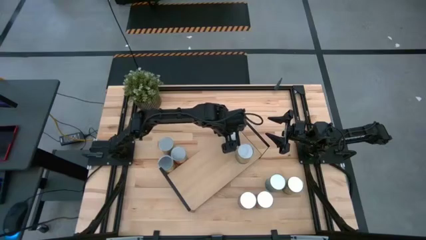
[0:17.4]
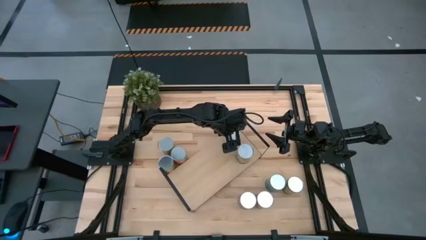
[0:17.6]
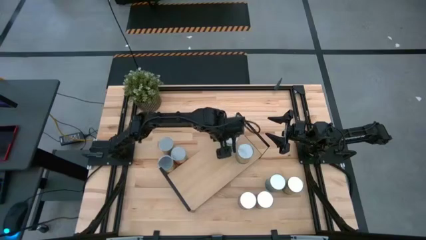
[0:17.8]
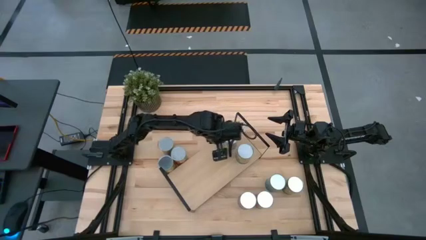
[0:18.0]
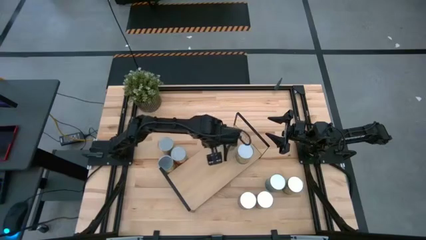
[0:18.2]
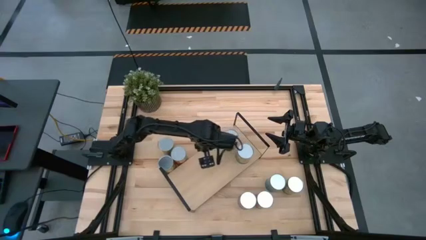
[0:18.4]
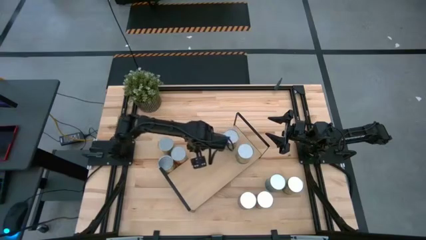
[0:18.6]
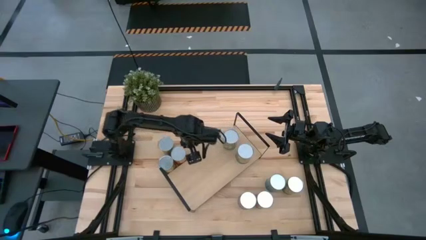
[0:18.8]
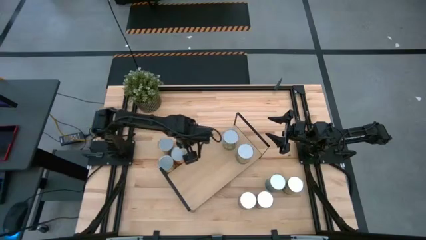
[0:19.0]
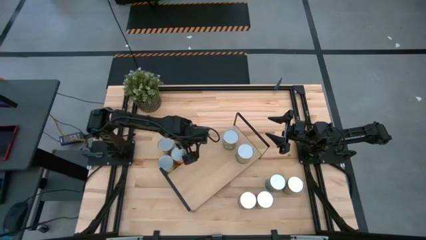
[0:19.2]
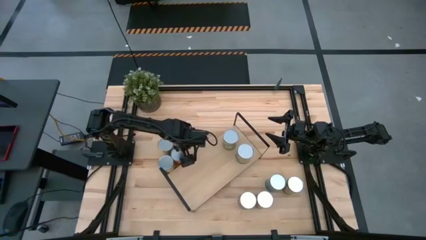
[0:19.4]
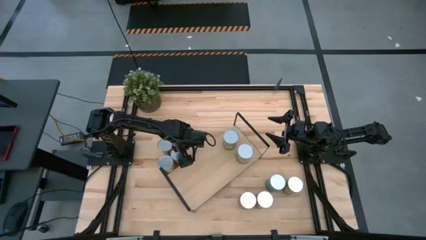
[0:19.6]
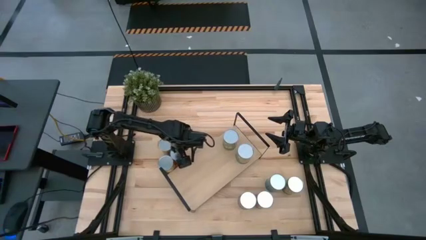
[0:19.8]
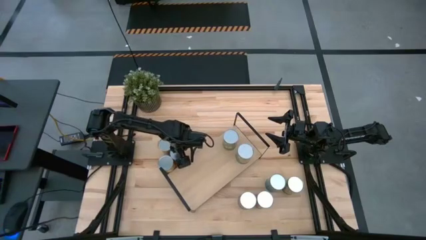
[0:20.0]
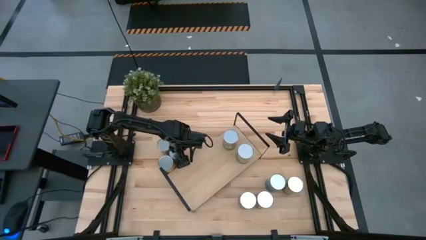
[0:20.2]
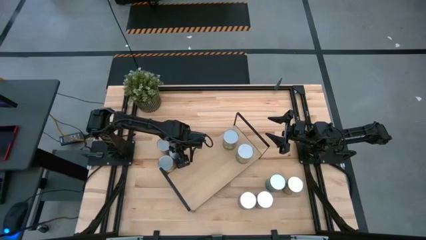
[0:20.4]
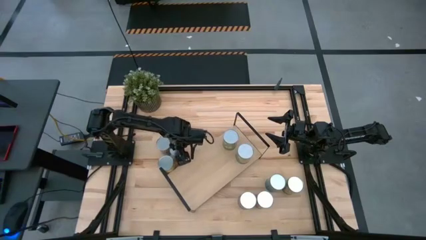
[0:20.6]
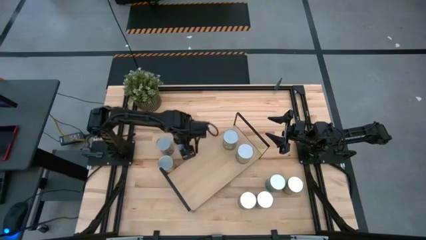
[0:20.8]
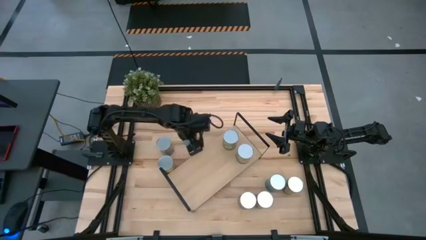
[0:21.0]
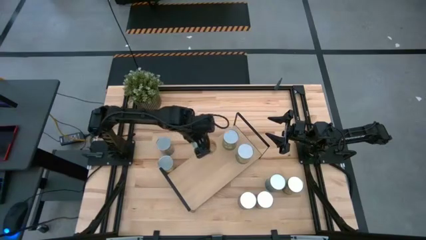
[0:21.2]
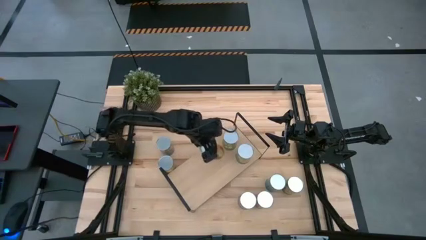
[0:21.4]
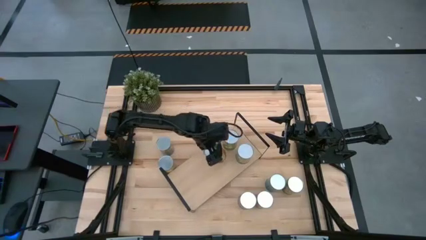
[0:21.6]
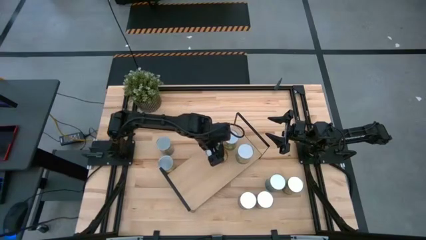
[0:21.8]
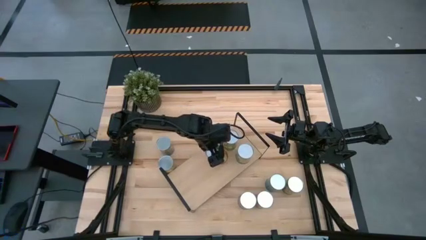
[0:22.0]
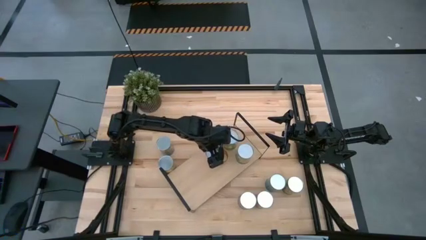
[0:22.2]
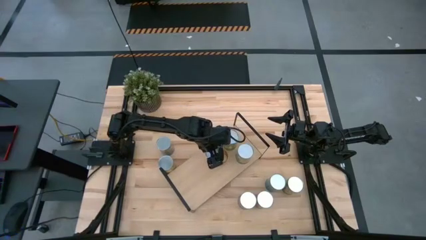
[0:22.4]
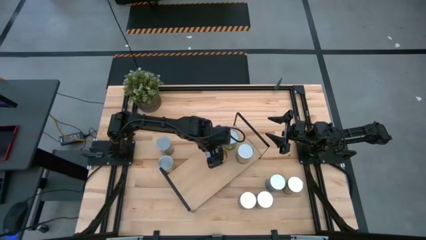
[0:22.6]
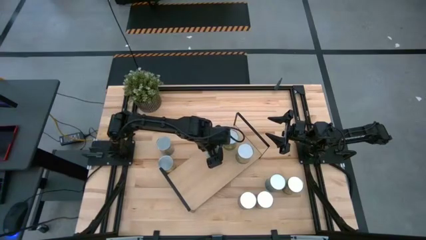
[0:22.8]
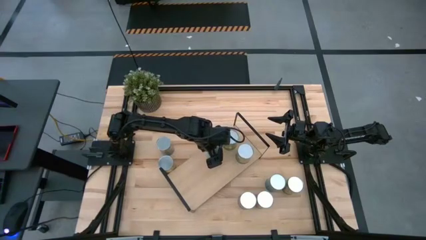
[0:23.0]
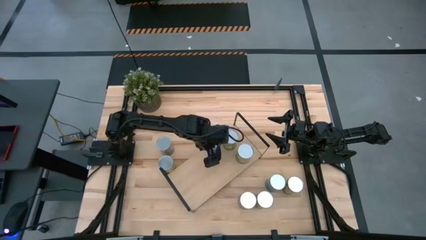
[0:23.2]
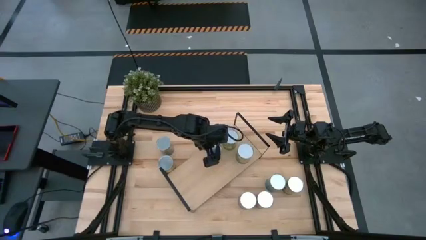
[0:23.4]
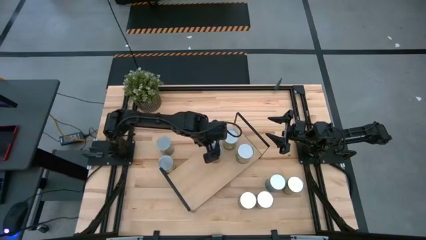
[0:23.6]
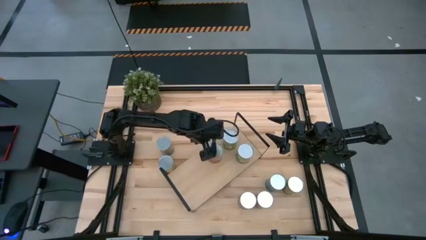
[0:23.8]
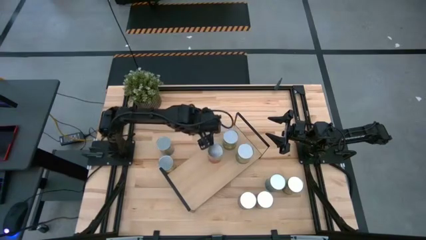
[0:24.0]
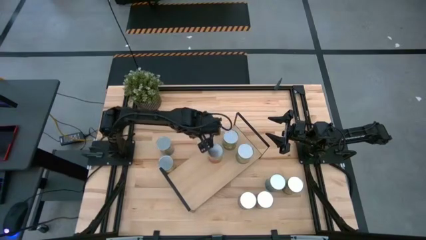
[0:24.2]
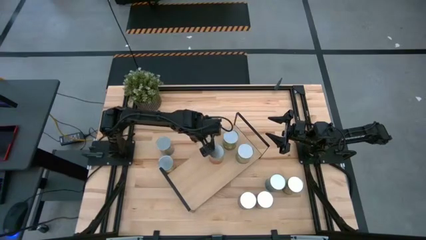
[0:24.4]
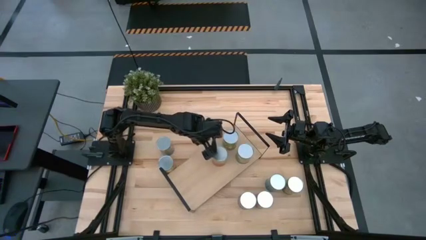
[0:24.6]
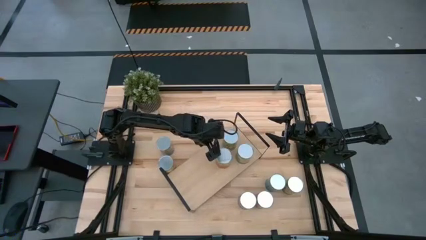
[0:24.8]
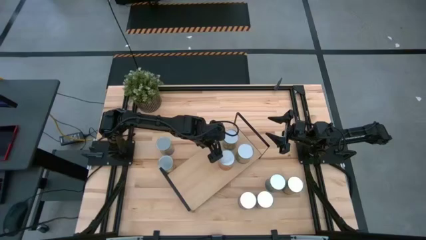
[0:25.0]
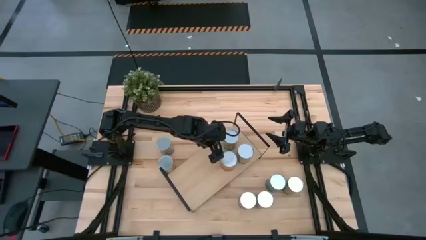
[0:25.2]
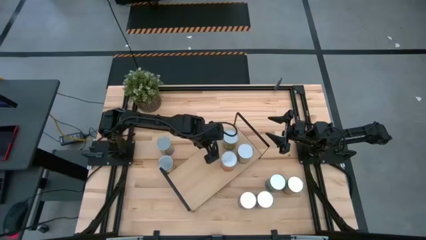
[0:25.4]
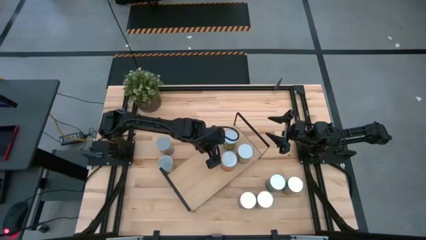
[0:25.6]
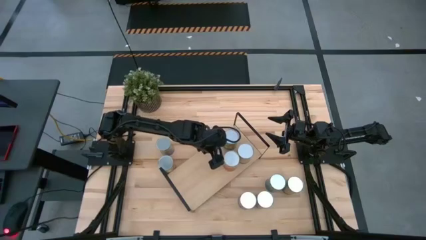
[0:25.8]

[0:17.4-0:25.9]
Task: Pick and place cans onto a shelf
Put the right canned pineapple on the shelf

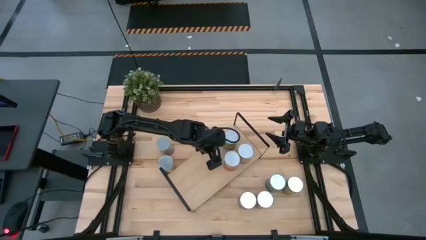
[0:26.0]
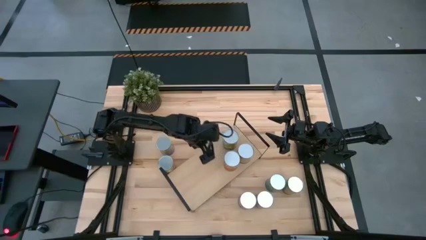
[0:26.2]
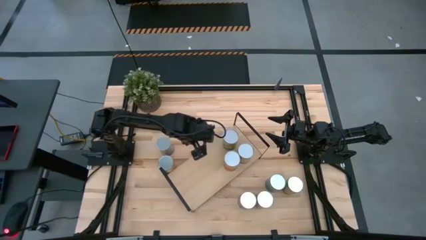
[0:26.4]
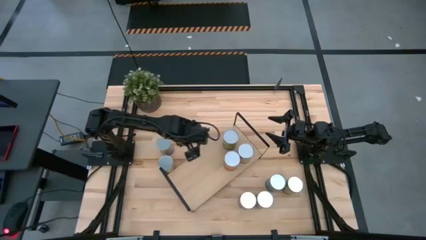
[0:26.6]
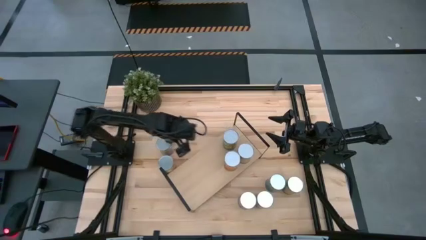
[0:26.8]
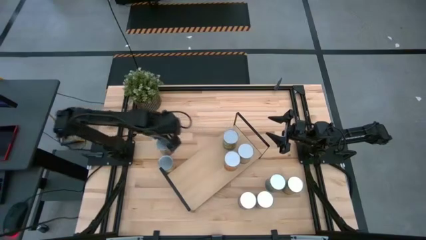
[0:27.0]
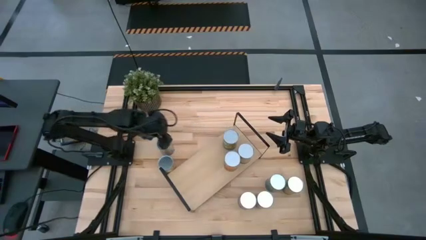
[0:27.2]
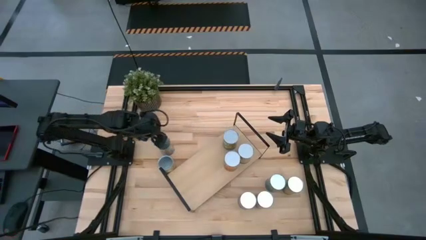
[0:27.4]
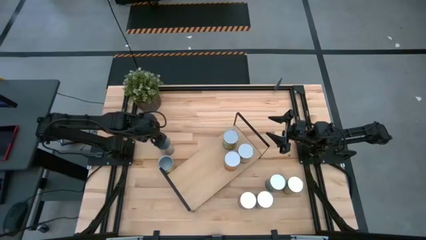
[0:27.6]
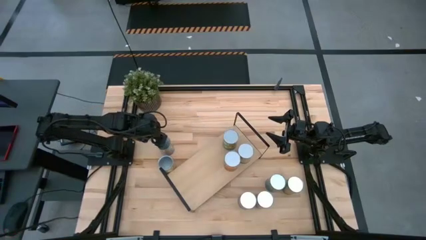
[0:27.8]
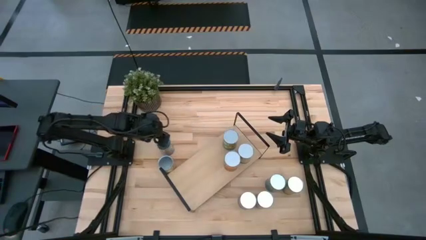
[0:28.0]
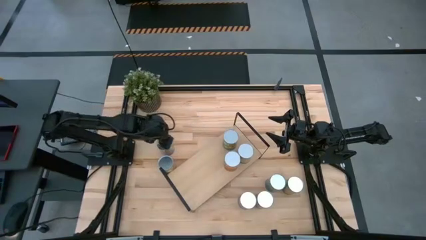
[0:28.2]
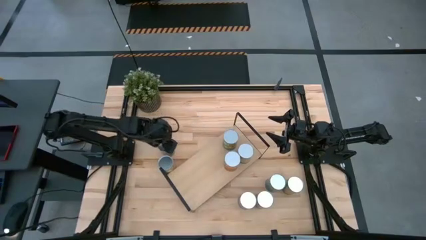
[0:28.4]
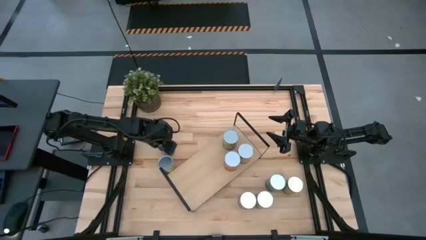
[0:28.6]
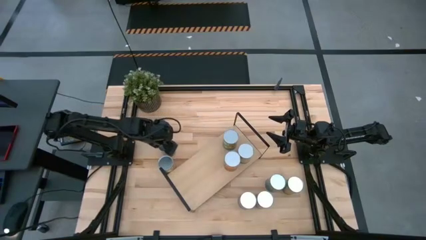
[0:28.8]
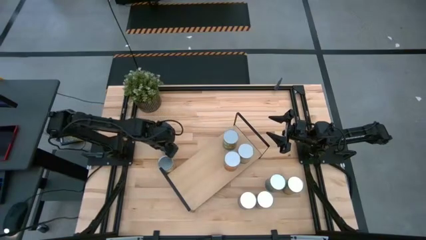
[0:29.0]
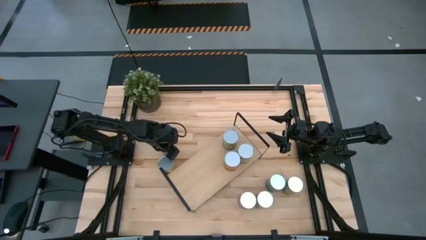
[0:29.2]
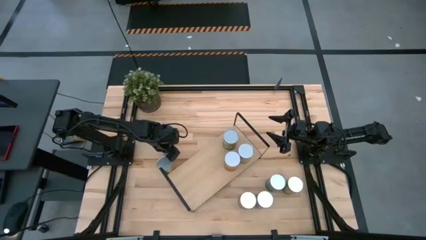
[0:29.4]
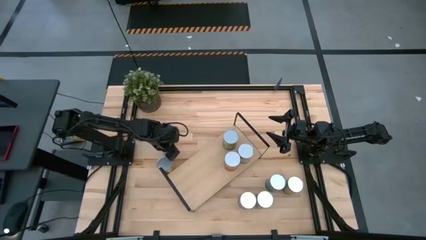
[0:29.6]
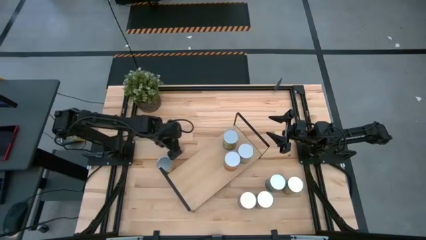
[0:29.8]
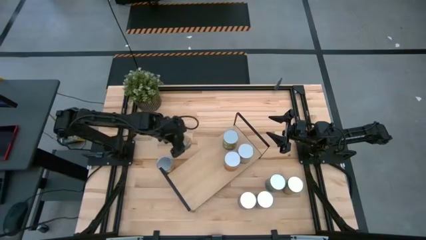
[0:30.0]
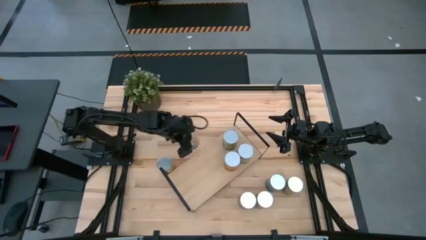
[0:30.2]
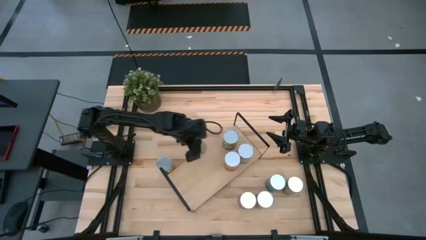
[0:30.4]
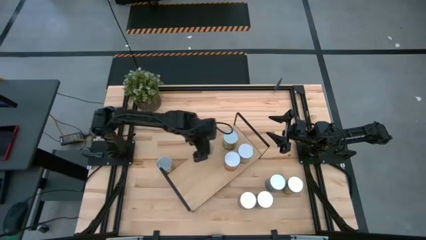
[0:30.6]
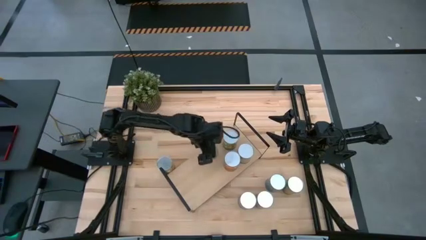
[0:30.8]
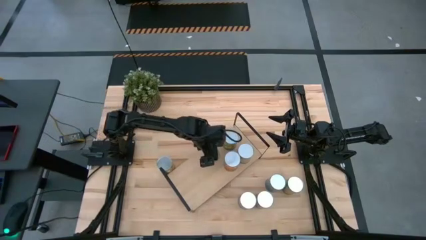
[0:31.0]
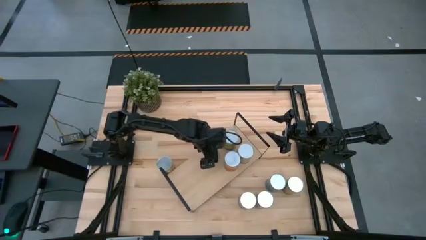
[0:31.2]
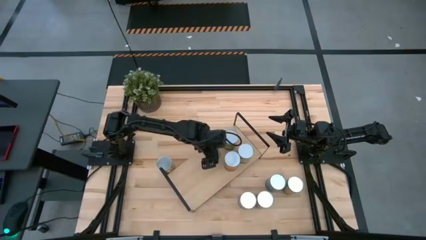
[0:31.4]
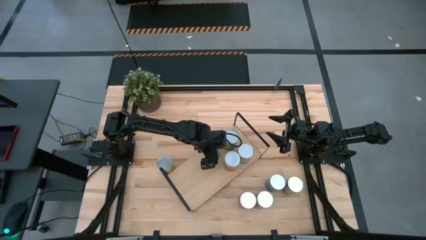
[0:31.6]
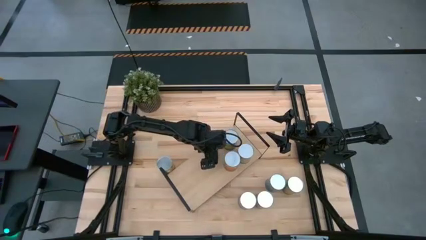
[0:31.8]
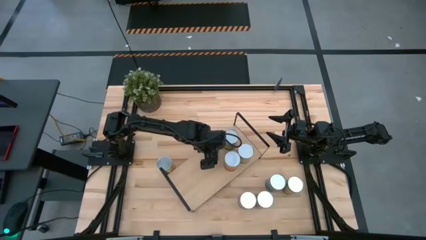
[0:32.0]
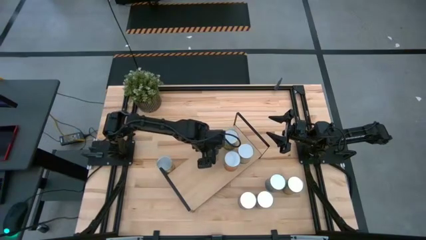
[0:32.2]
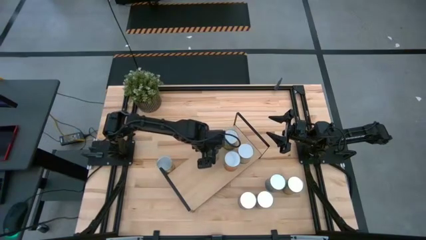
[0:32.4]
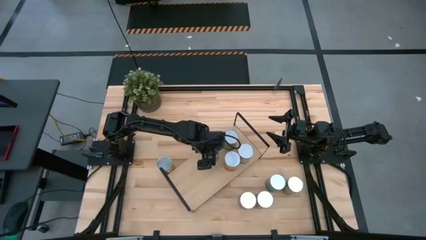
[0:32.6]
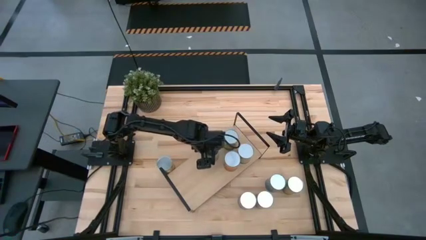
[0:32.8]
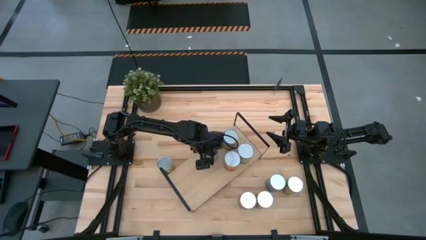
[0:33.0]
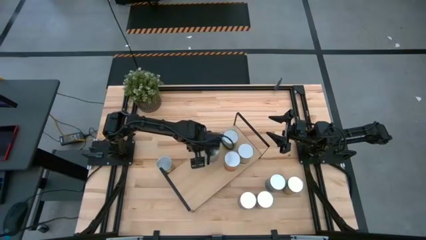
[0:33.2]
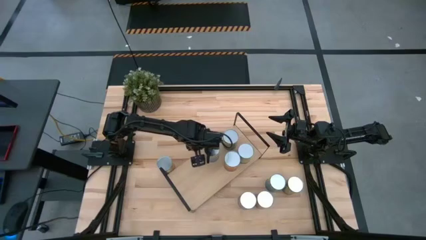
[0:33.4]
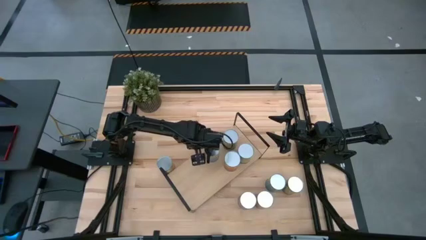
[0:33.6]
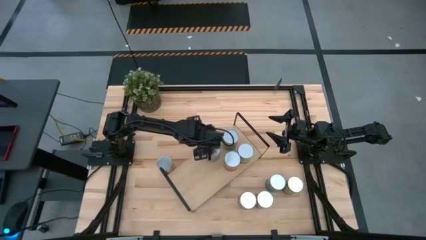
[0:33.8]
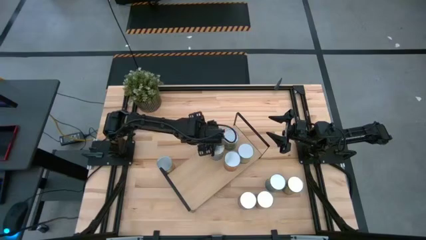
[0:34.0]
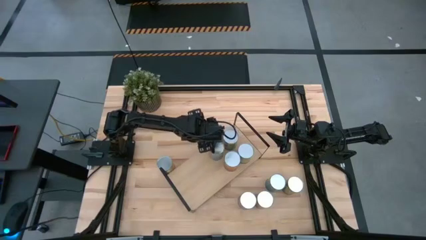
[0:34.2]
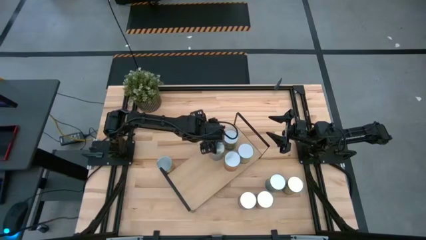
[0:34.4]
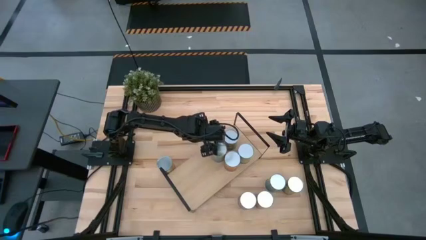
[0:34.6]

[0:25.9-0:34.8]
Put the canned peaches on the shelf
